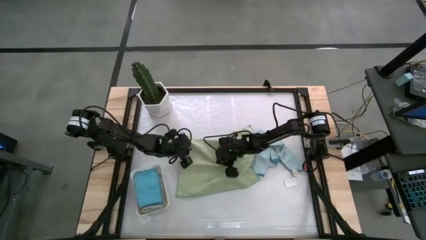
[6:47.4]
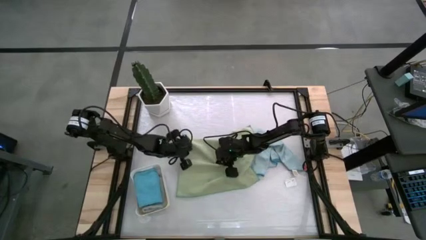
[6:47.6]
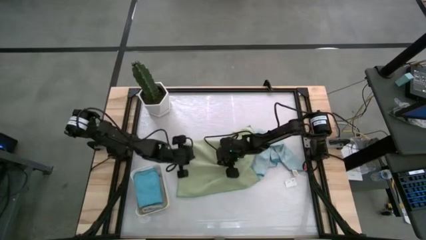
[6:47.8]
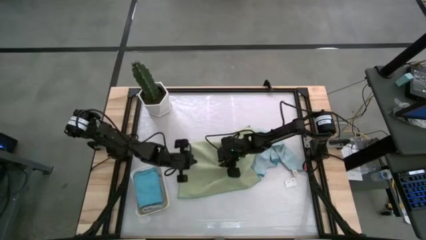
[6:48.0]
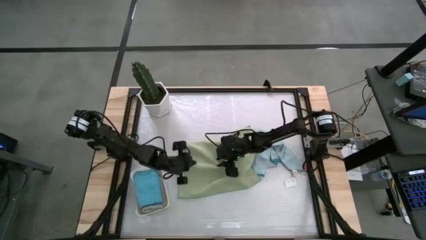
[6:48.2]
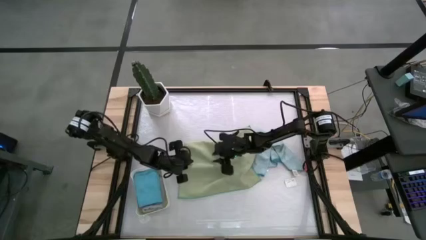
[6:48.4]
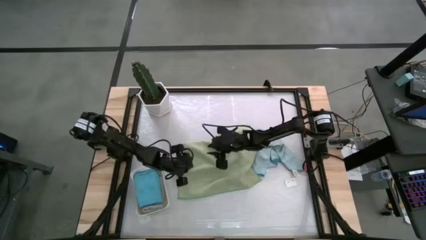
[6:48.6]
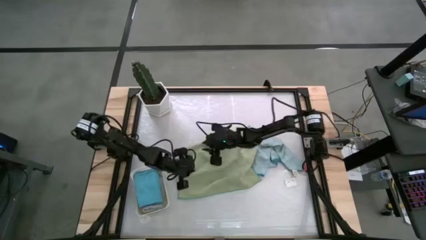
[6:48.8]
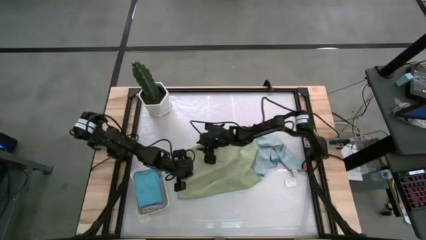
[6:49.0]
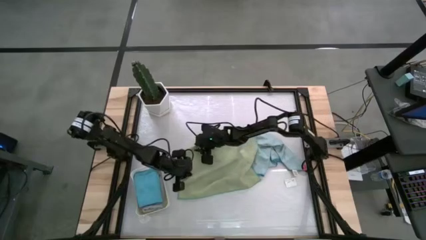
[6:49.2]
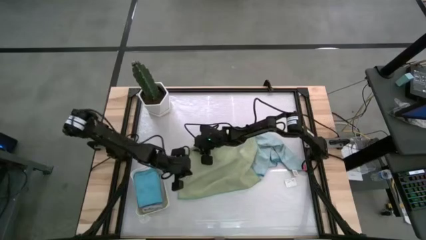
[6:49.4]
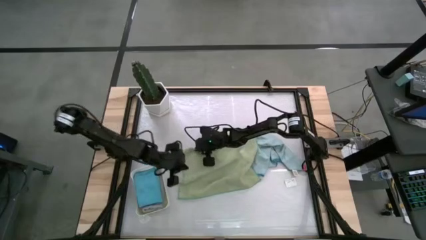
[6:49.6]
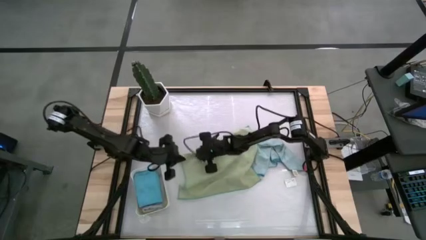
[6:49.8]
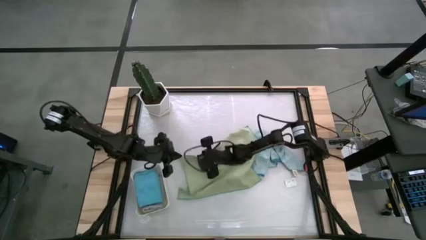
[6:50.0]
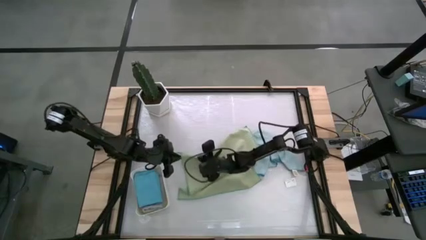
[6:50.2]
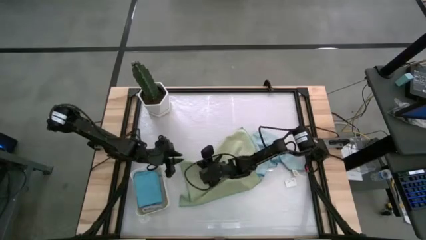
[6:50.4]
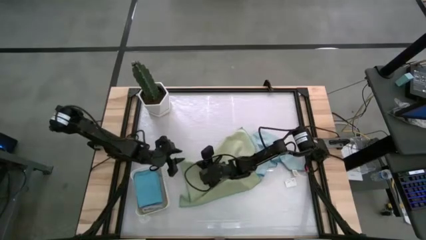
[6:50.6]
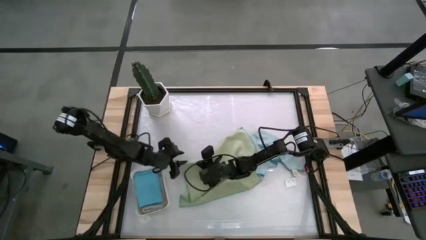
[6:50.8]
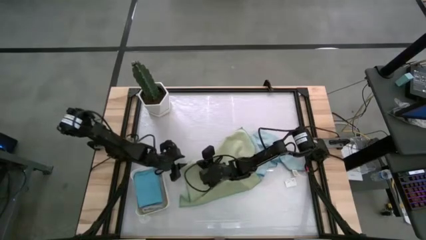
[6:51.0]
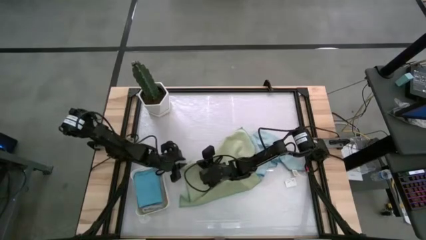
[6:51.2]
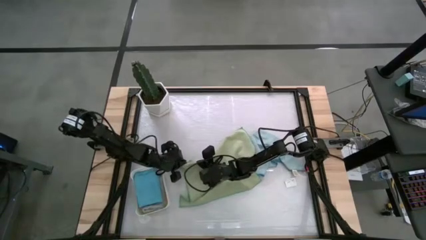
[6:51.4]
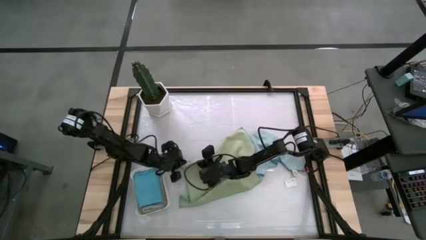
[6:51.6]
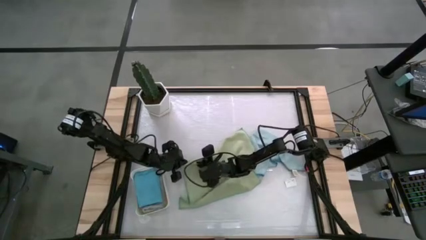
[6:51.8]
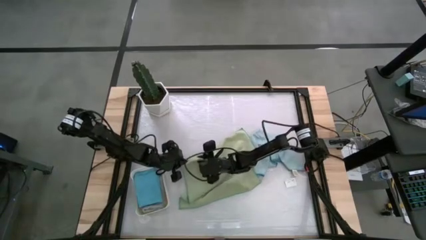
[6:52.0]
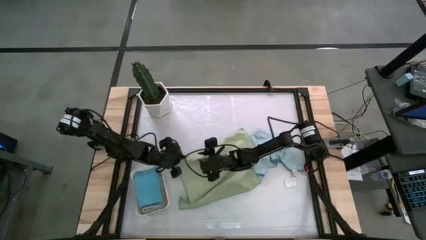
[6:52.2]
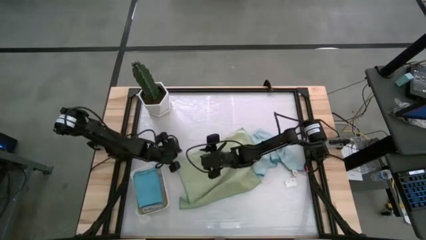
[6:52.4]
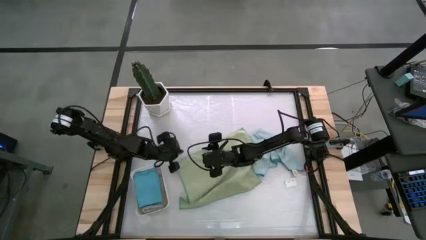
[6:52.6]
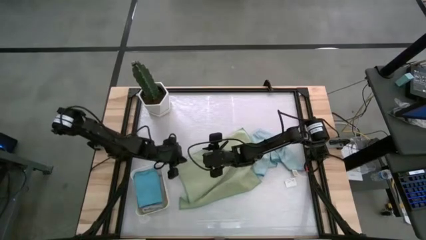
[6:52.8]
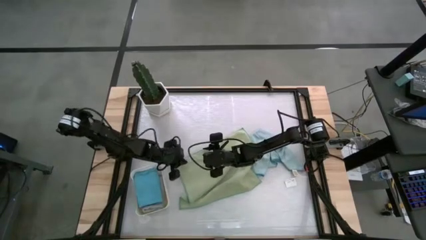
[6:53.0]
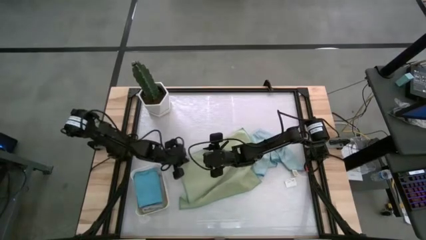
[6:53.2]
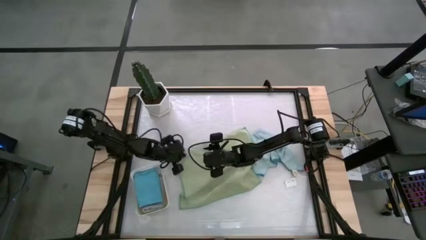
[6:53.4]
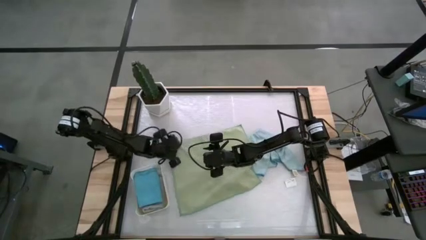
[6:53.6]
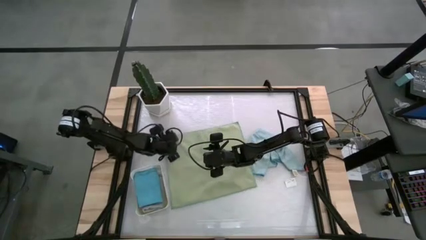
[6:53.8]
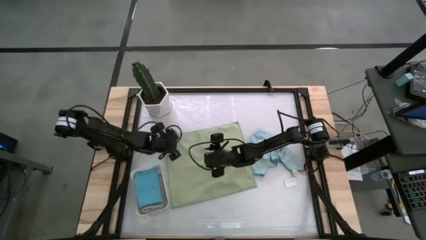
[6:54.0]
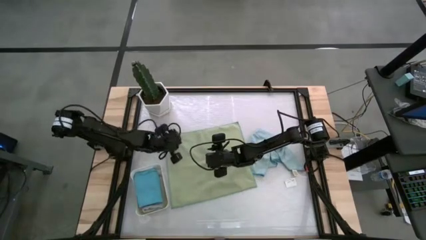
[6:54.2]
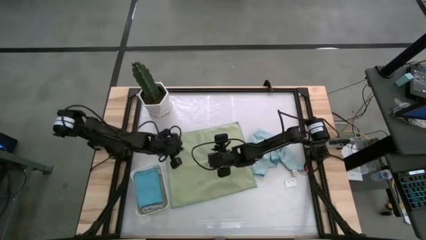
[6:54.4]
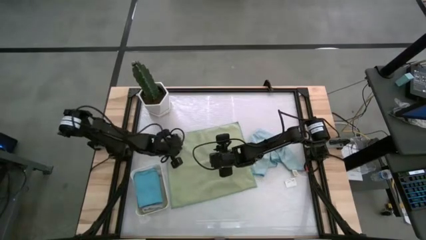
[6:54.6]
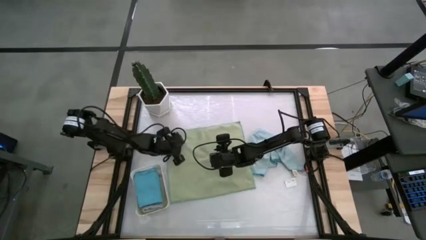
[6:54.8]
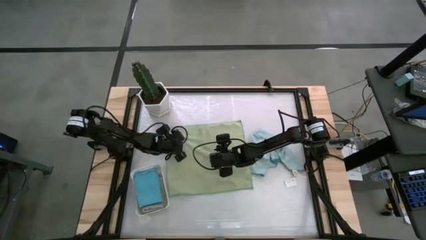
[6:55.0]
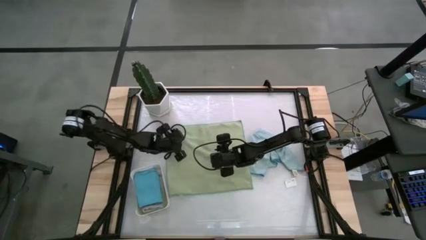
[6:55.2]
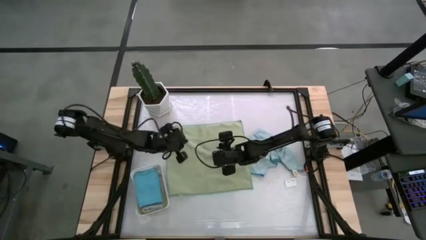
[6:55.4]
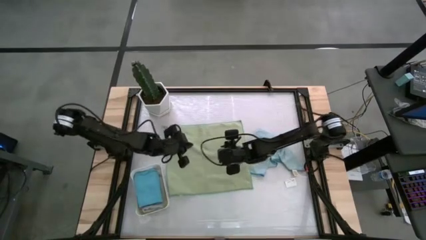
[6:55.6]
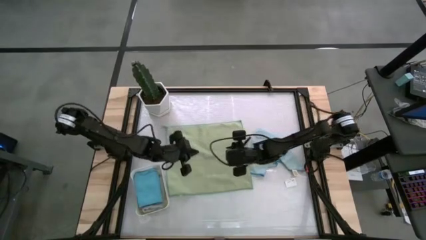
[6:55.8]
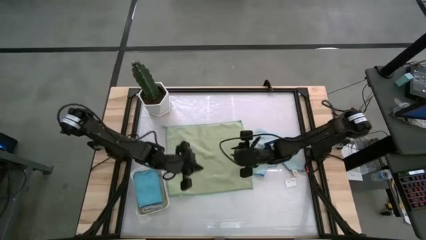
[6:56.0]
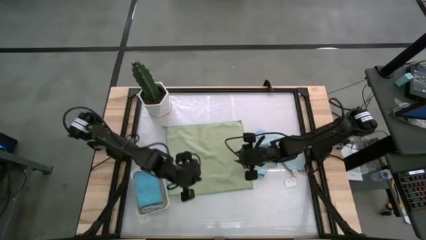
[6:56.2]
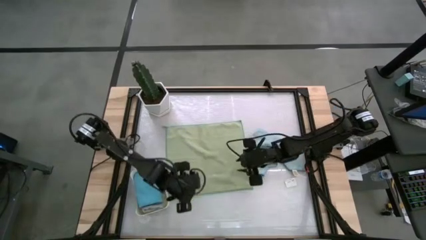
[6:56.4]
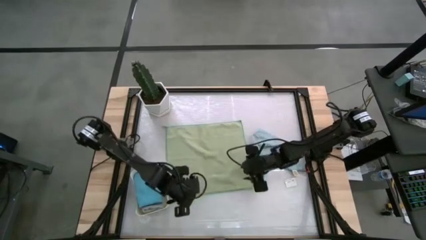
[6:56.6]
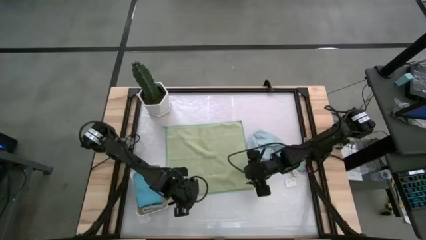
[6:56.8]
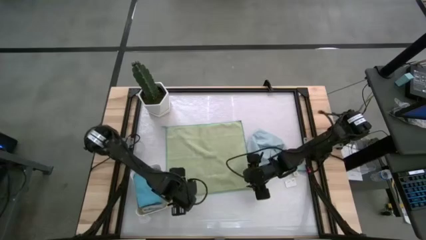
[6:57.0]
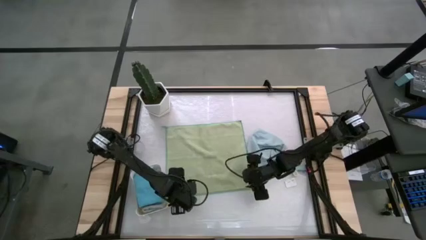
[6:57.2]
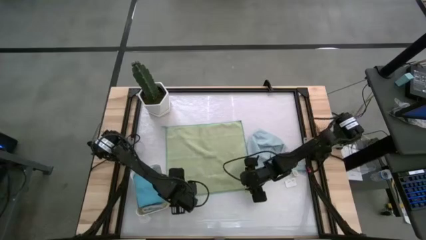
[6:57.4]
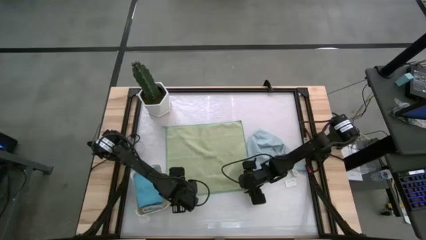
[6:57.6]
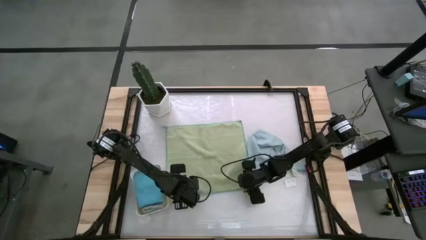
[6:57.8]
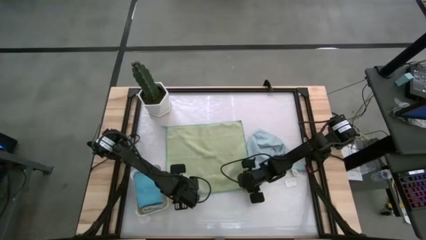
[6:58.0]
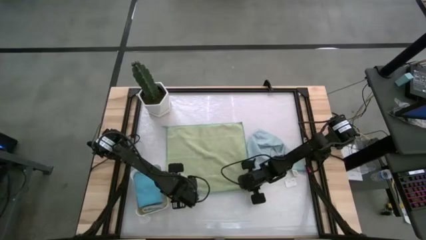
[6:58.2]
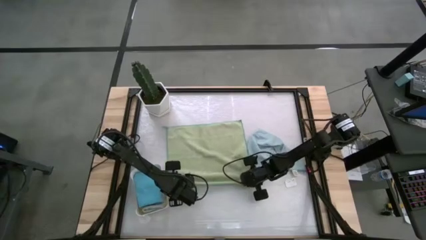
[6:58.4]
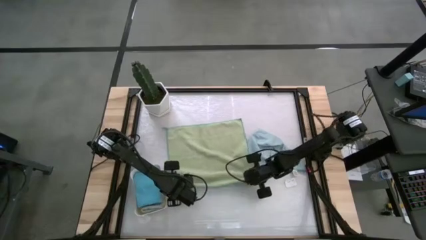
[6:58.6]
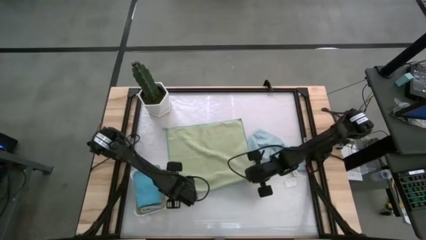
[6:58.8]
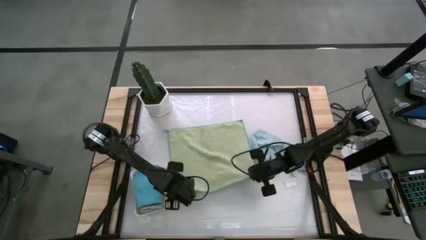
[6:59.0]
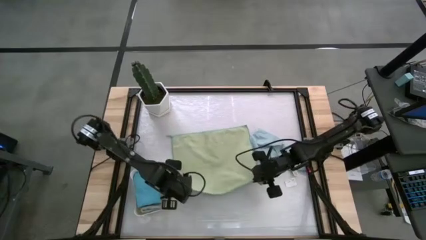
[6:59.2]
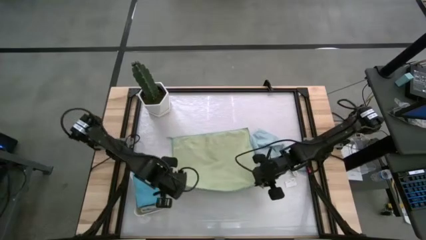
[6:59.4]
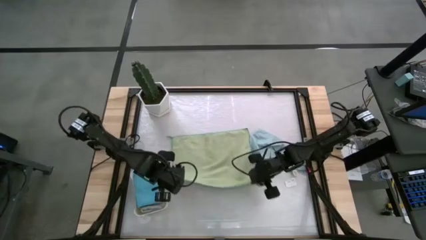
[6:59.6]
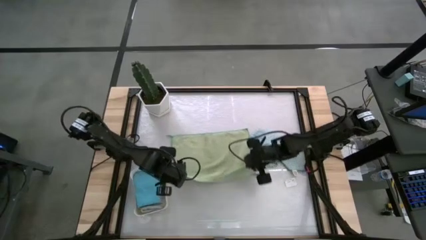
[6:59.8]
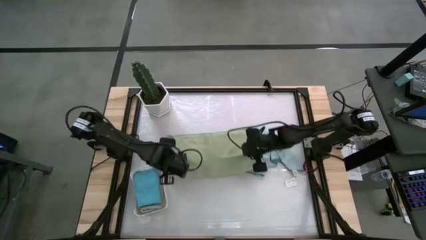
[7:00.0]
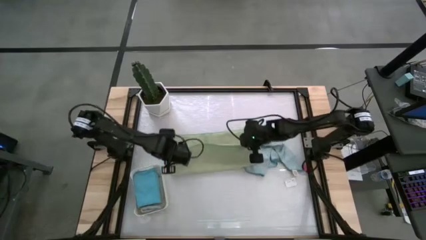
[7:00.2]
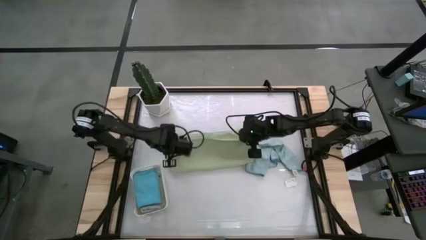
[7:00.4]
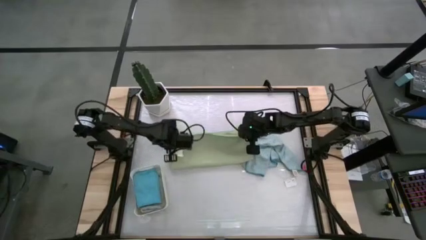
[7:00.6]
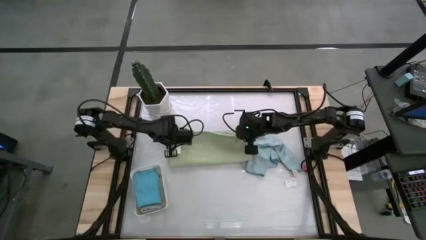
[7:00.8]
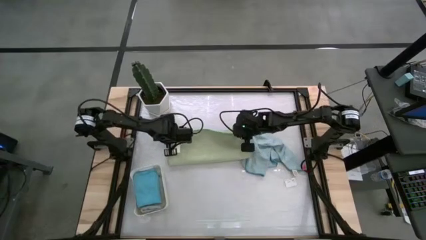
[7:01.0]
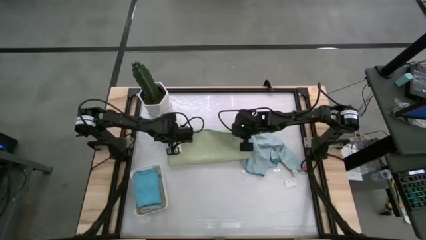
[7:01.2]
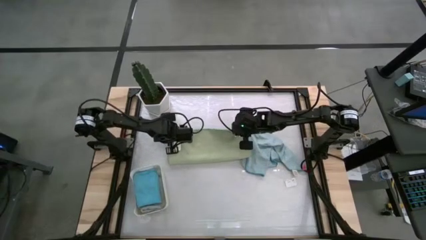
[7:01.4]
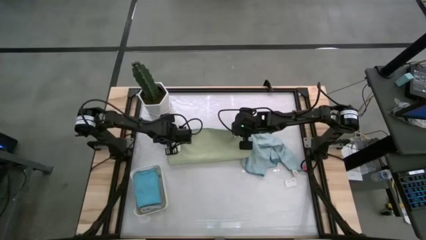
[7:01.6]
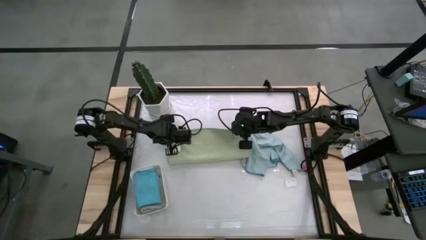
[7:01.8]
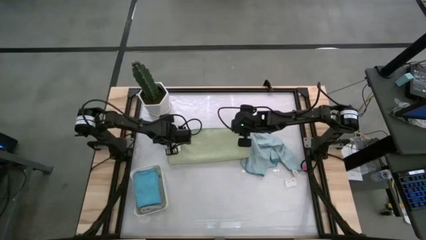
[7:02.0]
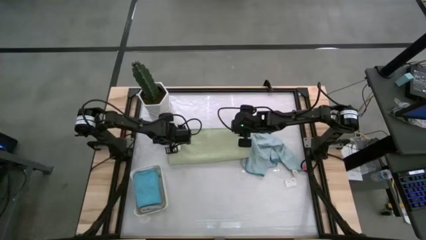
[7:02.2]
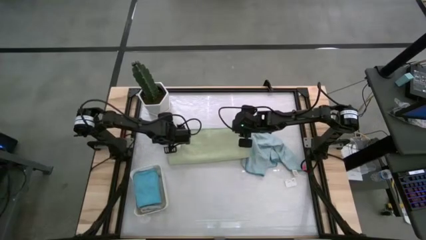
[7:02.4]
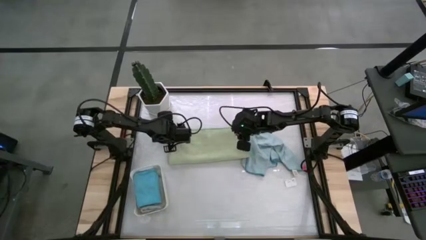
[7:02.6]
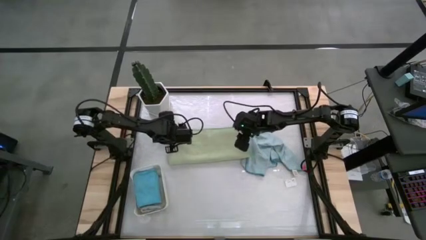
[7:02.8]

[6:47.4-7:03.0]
Task: Fold microfiber towels
Fold the green microfiber towel
